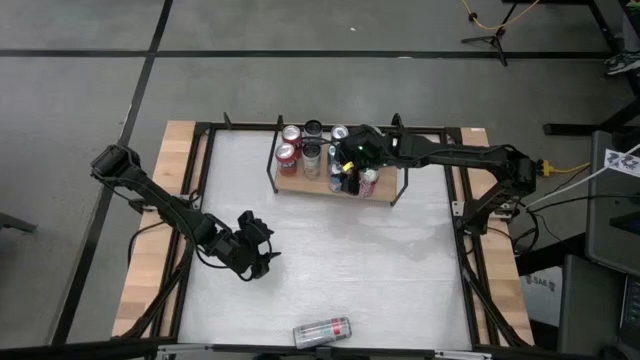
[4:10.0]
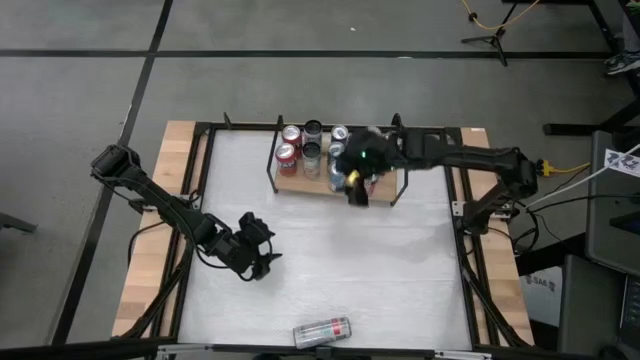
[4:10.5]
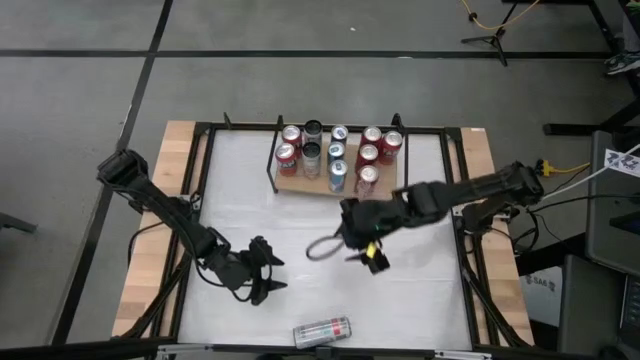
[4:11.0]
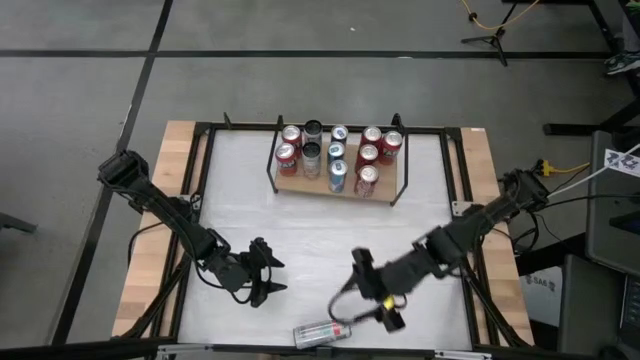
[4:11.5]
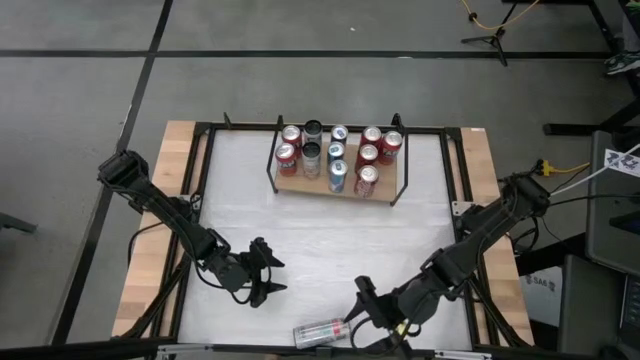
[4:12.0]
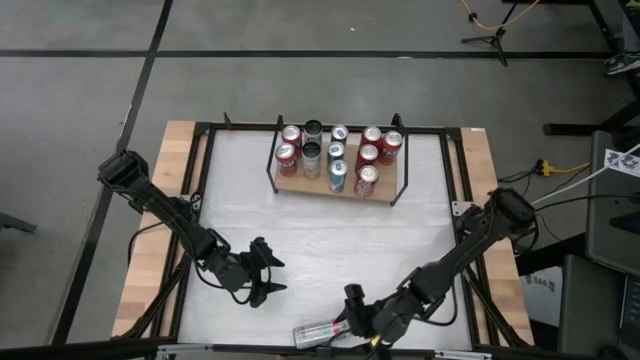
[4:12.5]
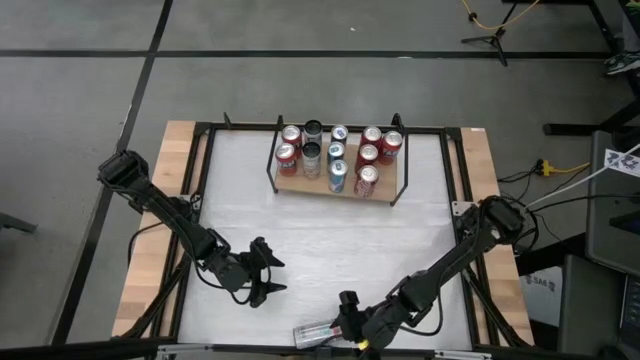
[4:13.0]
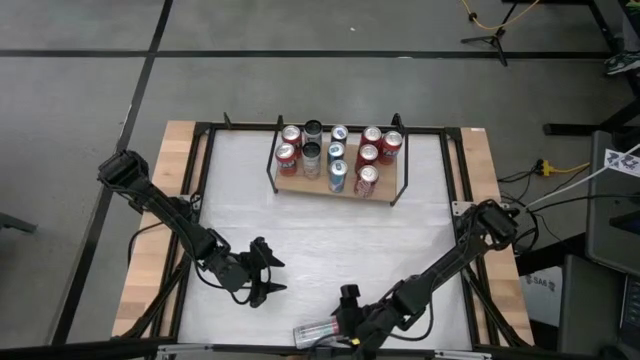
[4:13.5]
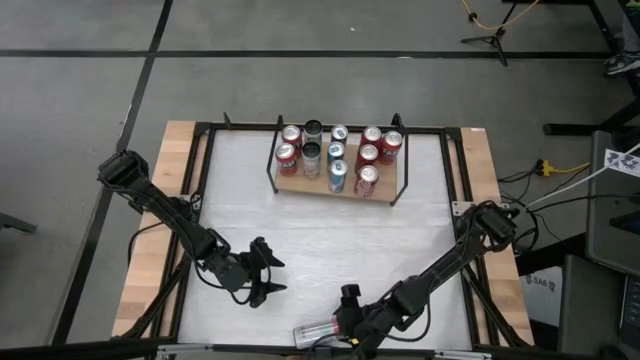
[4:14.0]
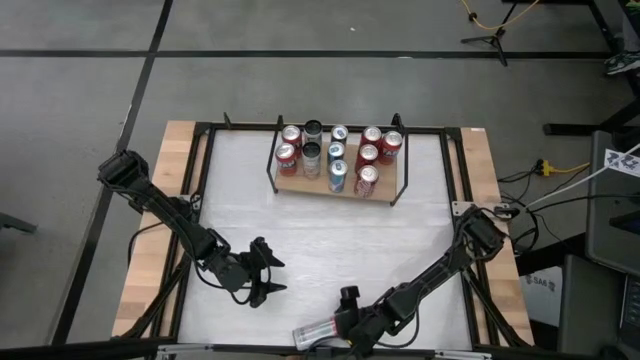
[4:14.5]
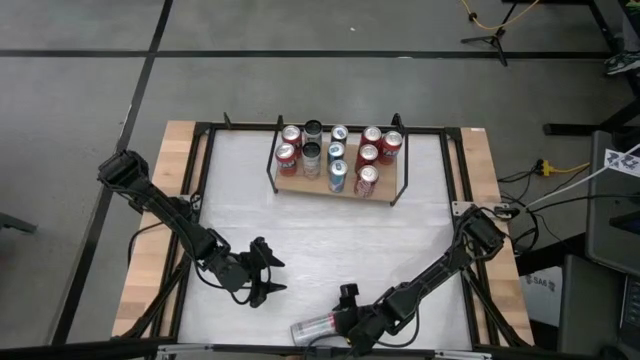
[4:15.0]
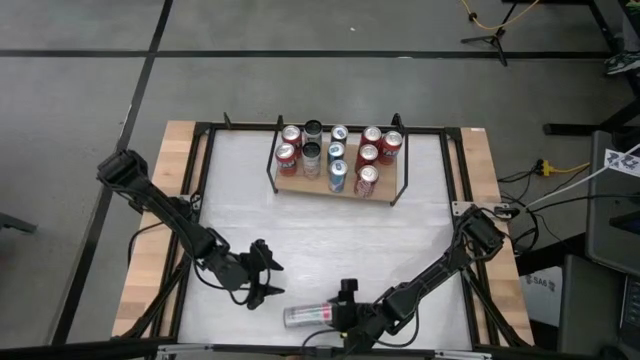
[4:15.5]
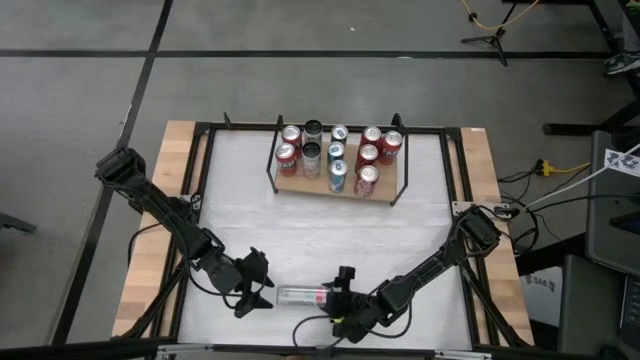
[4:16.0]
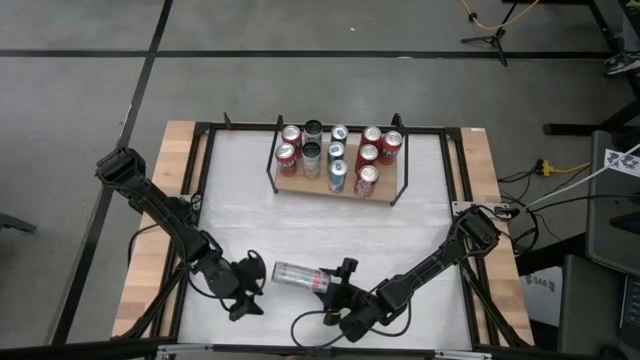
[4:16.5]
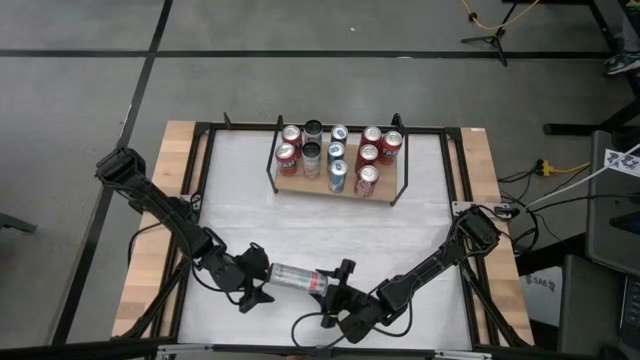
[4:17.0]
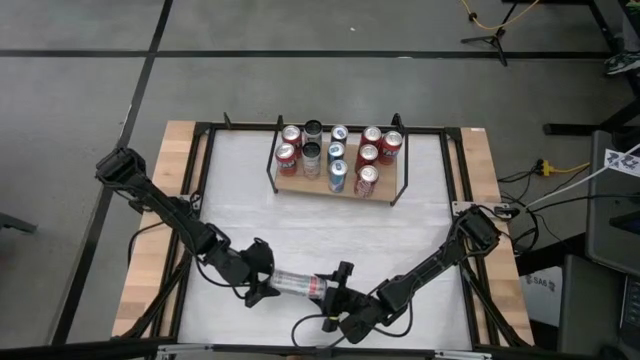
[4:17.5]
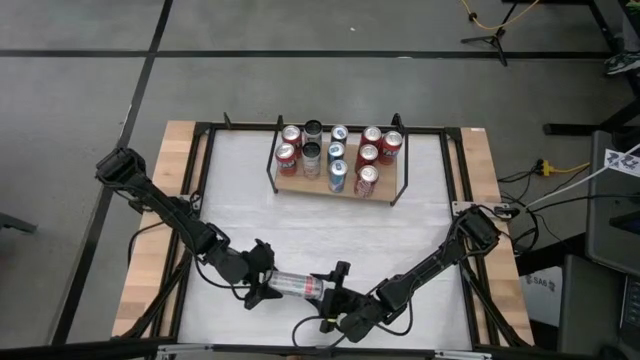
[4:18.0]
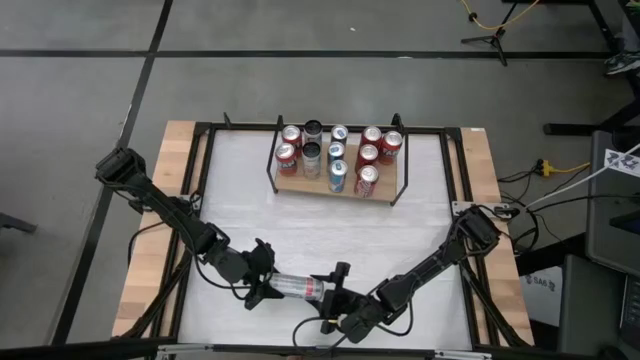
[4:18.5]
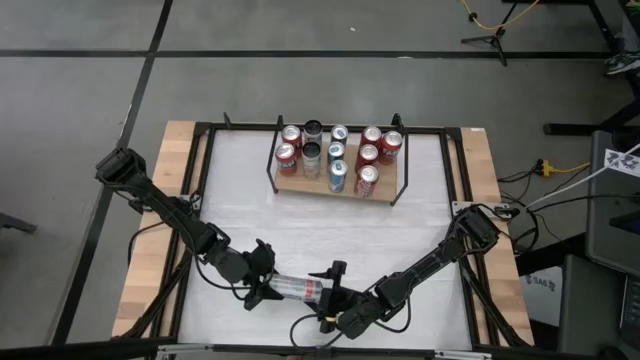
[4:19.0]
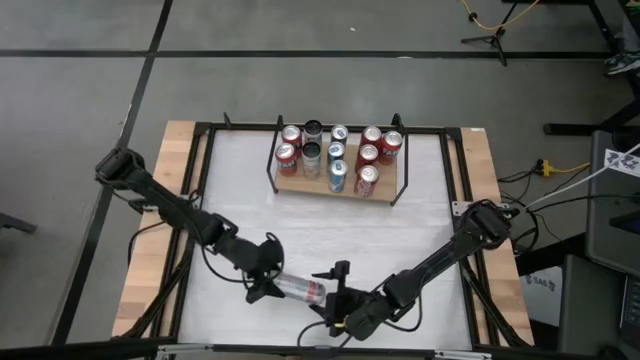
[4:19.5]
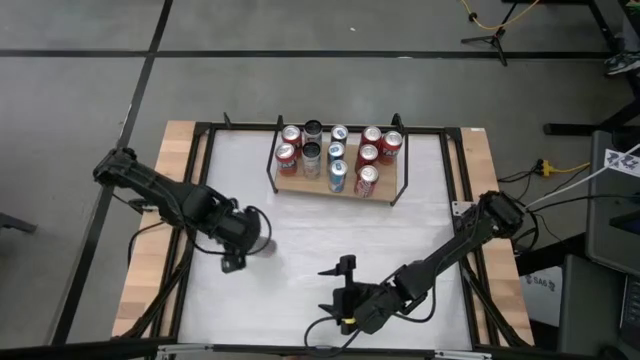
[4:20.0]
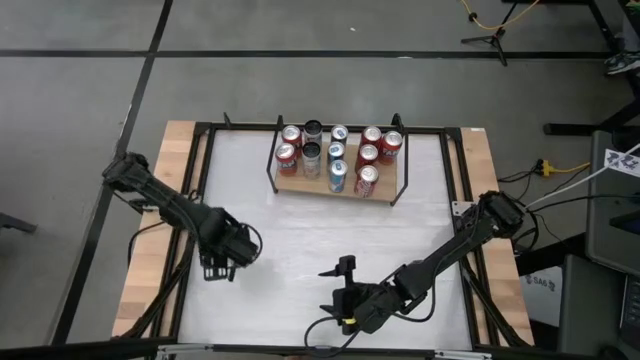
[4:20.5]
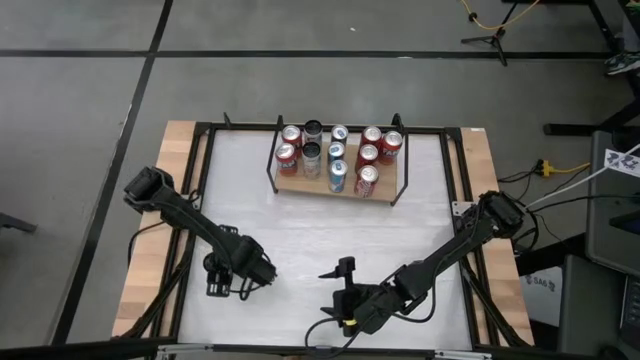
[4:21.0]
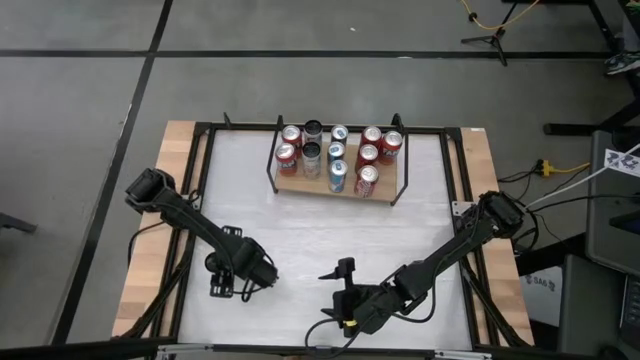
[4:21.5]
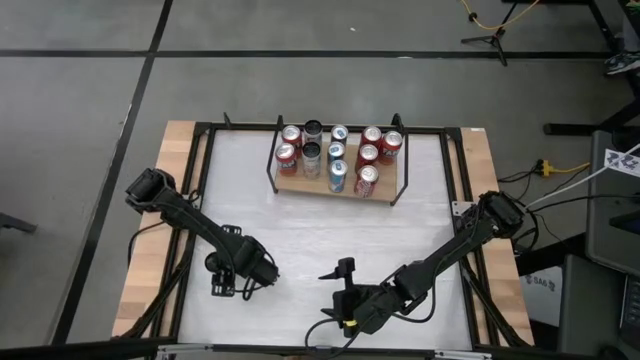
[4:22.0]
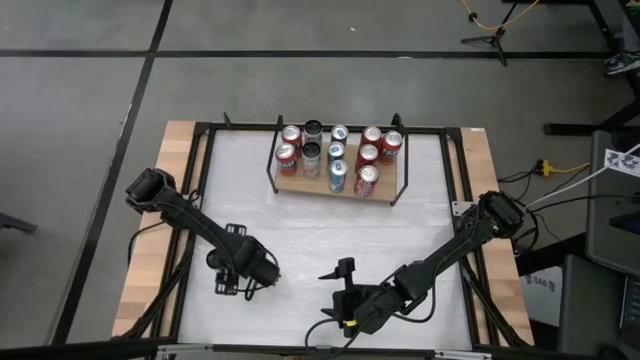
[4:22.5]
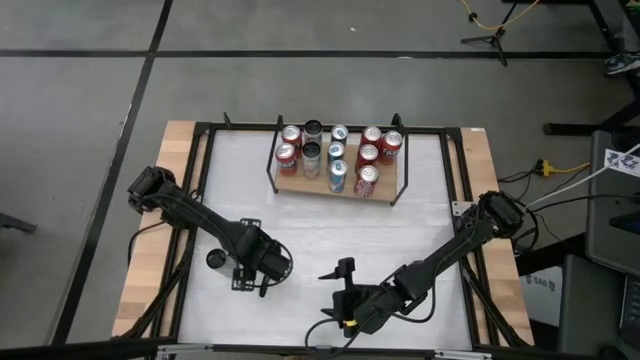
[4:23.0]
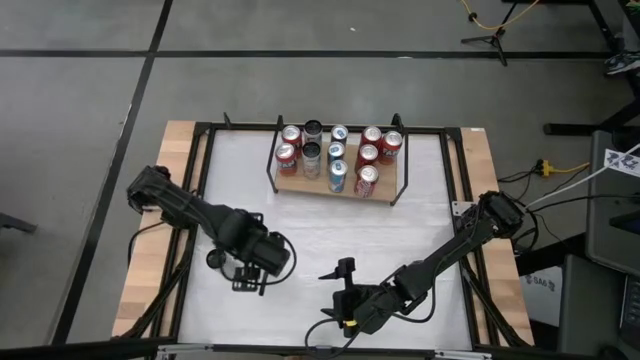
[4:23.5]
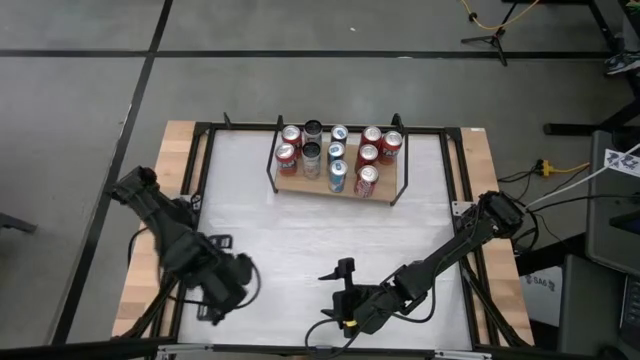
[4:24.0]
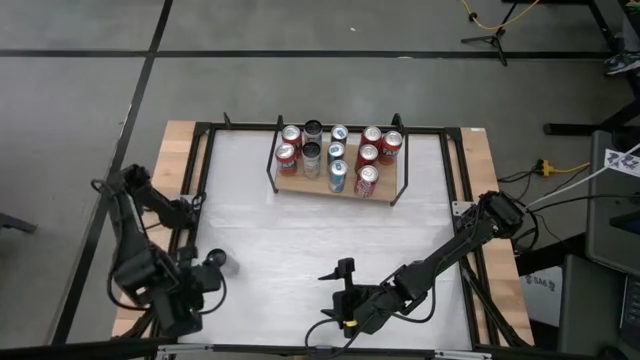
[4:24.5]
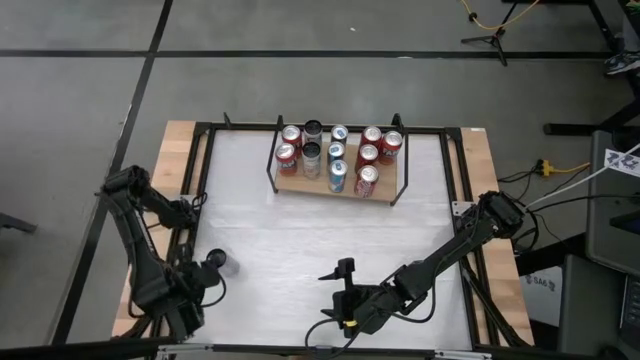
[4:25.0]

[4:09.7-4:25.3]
Task: Place canned beverage on shelf
Put the white-pink soda can on the shelf aligned with the white-pink soda cans

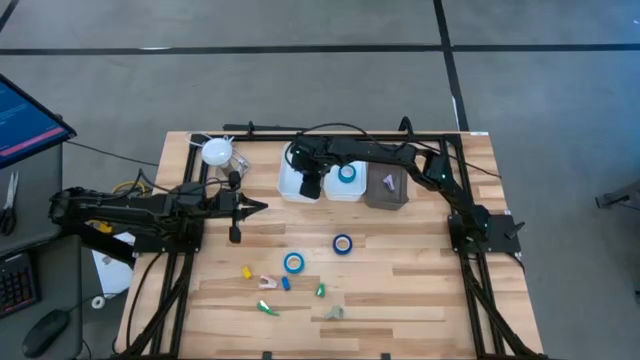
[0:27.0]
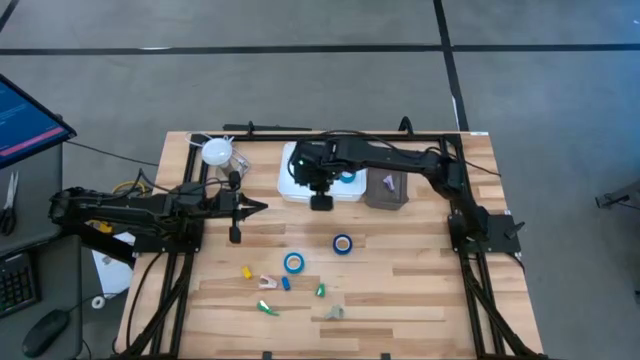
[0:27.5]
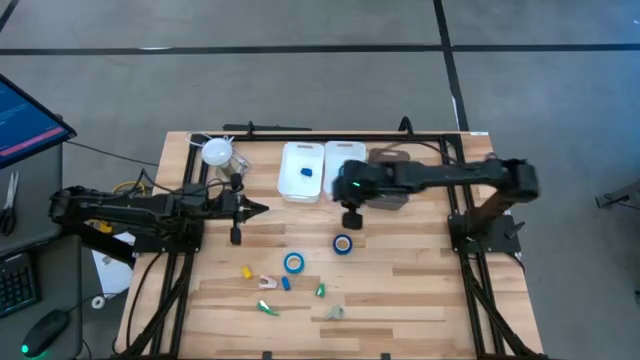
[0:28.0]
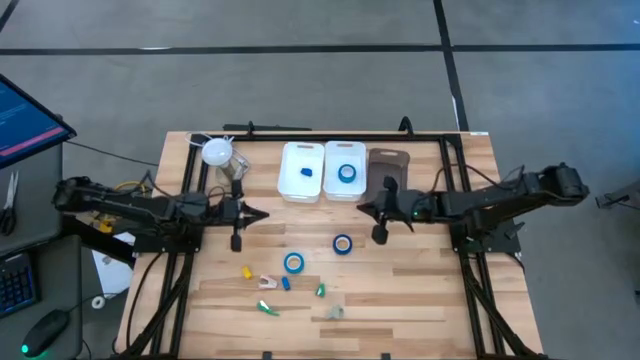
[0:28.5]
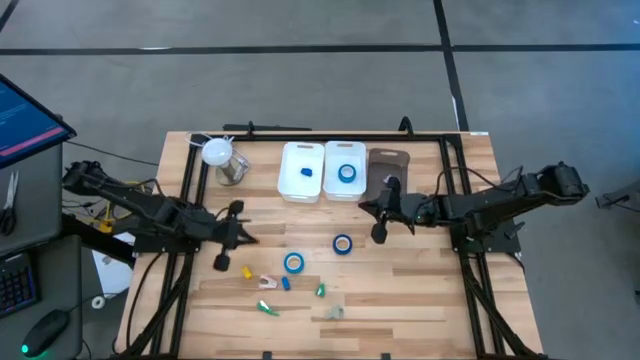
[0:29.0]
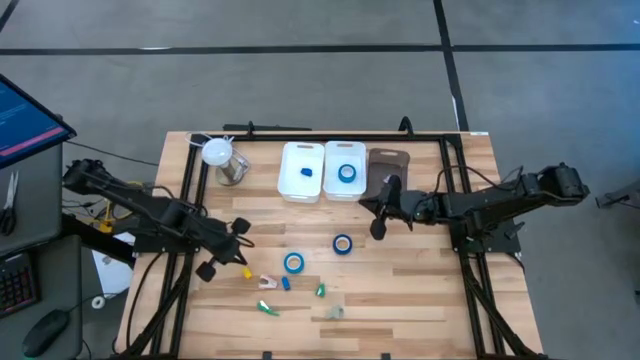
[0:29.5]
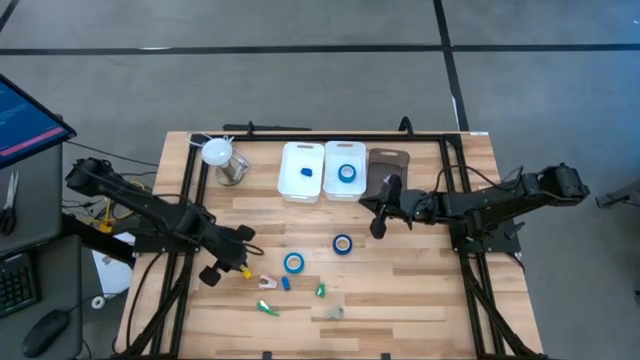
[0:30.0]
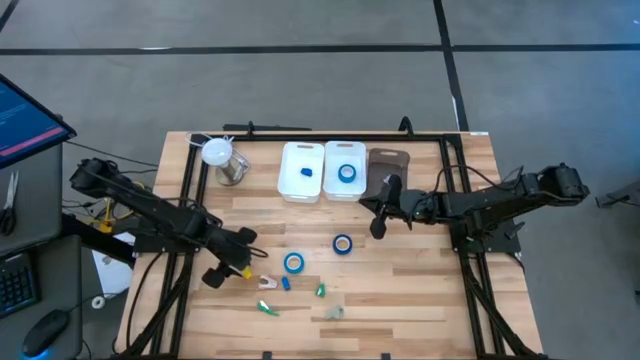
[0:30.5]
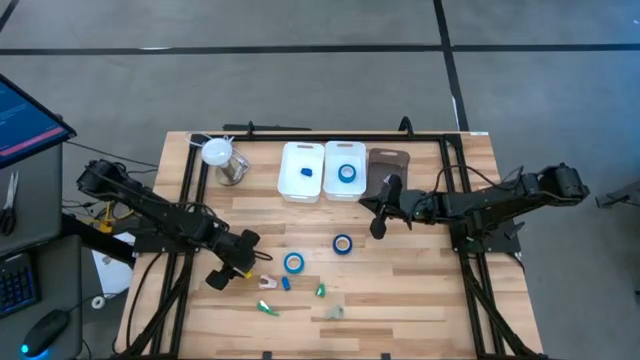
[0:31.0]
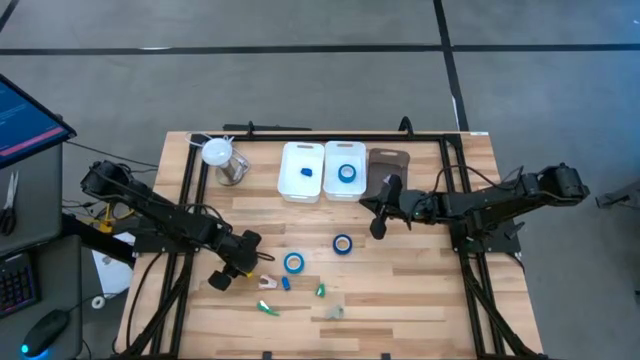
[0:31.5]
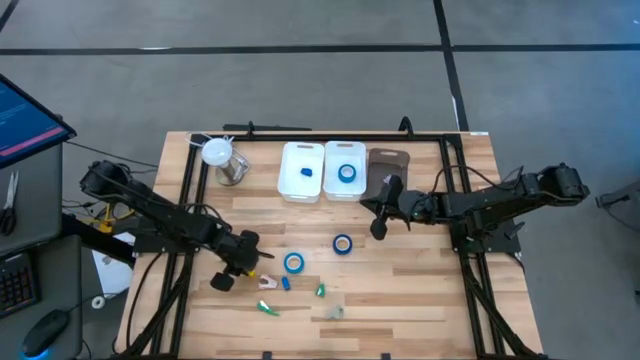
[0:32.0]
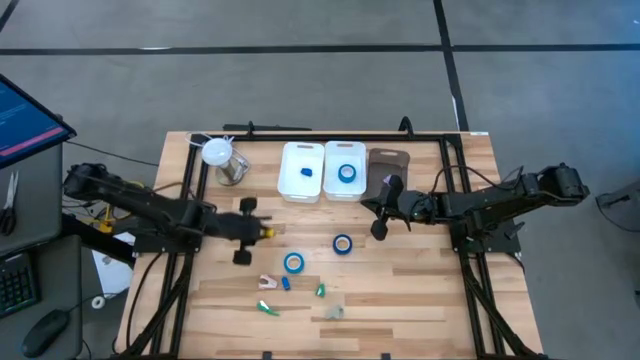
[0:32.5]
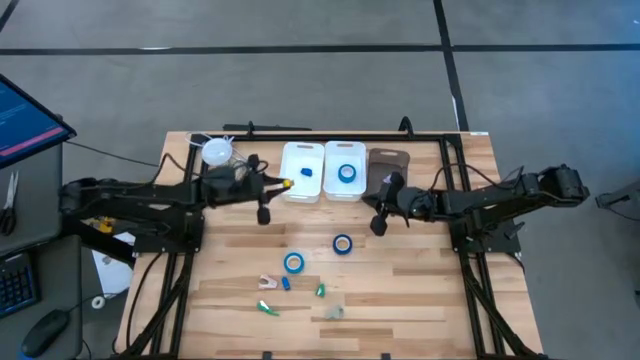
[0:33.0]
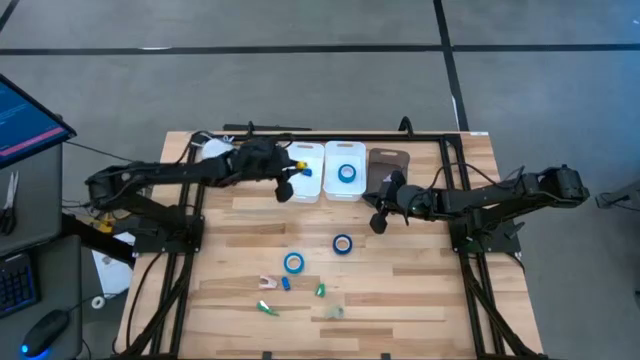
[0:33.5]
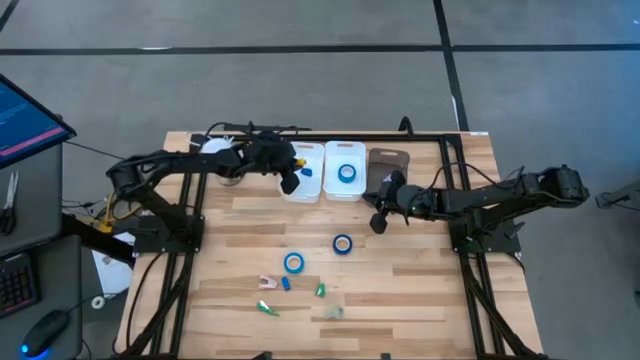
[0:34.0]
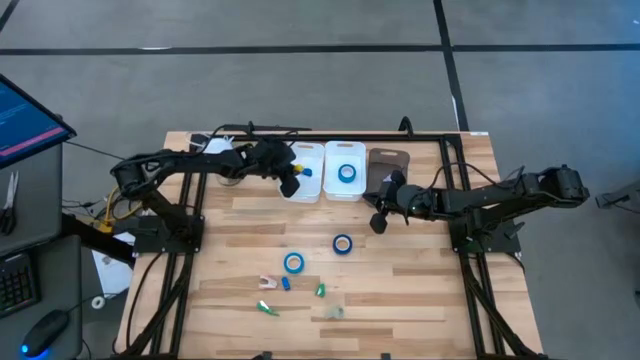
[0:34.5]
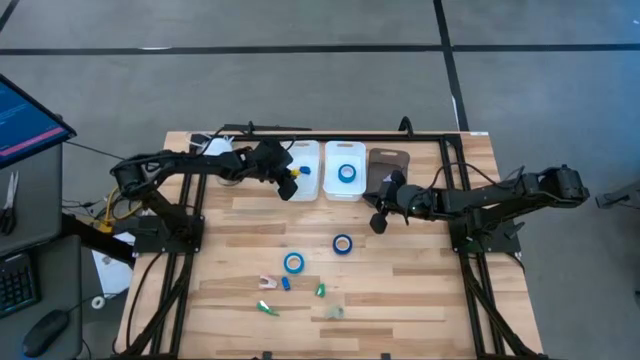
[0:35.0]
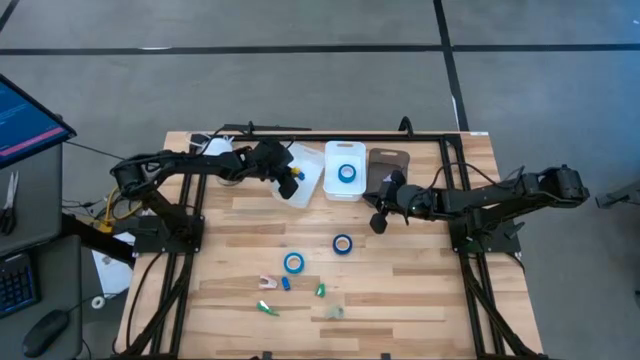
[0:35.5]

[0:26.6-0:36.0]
Task: Pick and place Stapler, Stapler remover, tape
Put the yellow stapler into the left white bin
